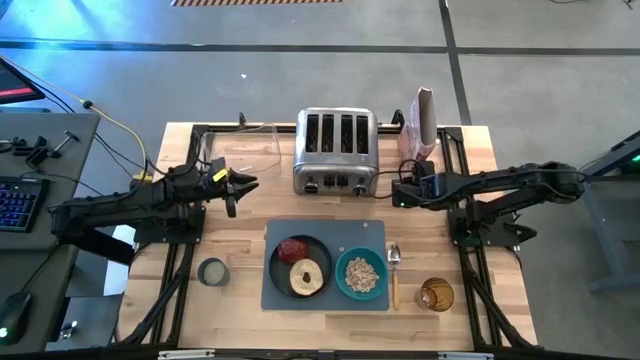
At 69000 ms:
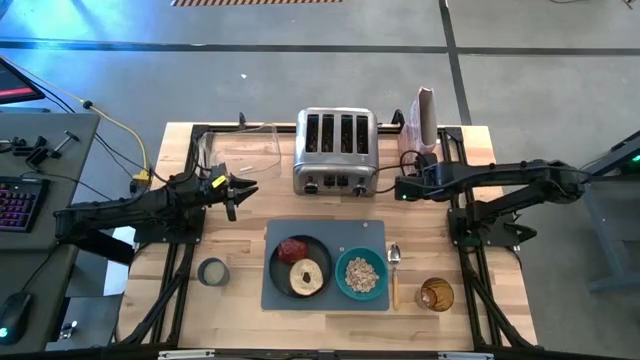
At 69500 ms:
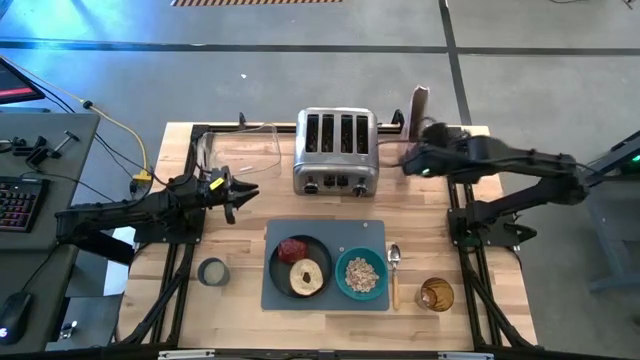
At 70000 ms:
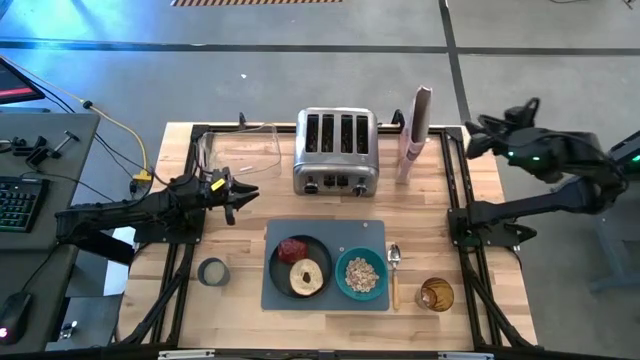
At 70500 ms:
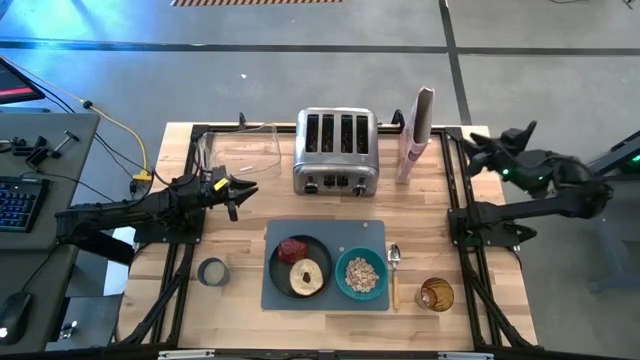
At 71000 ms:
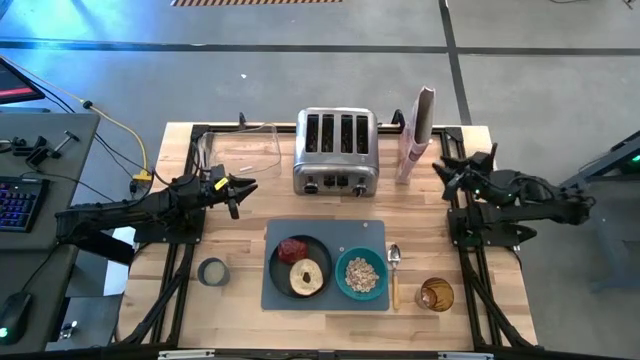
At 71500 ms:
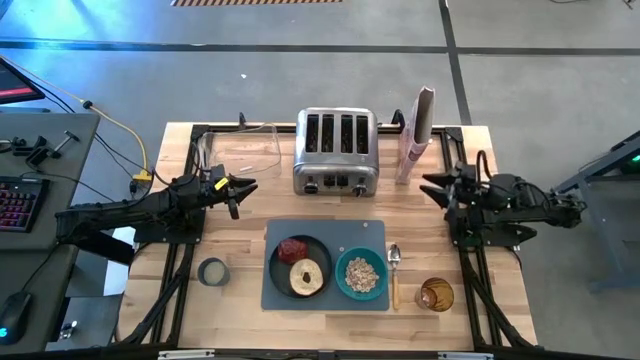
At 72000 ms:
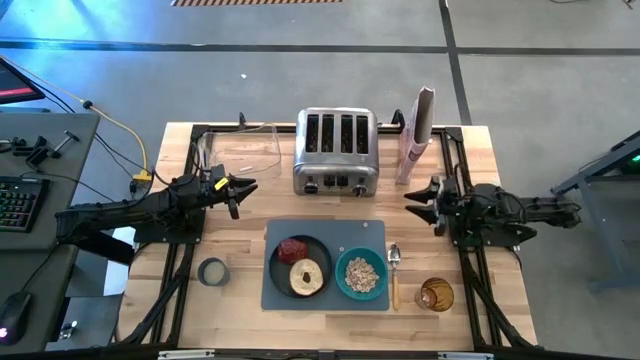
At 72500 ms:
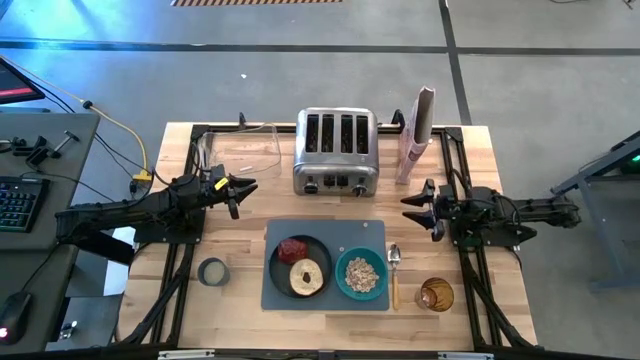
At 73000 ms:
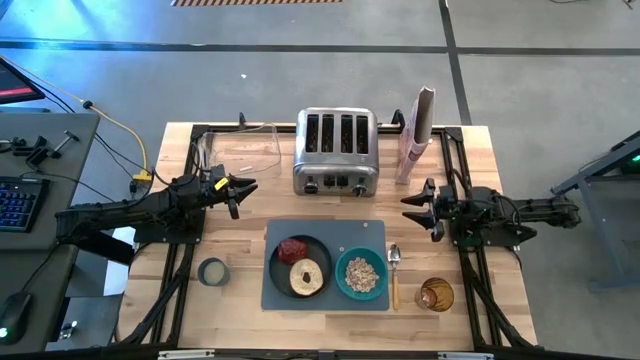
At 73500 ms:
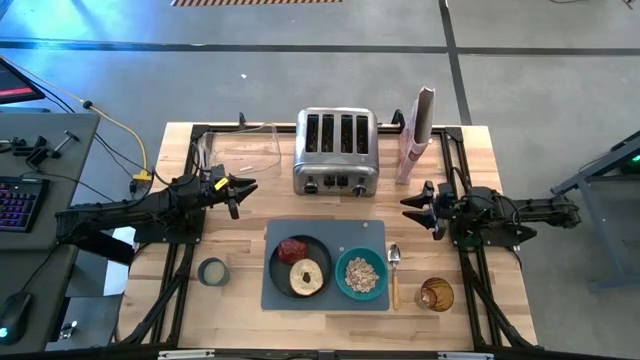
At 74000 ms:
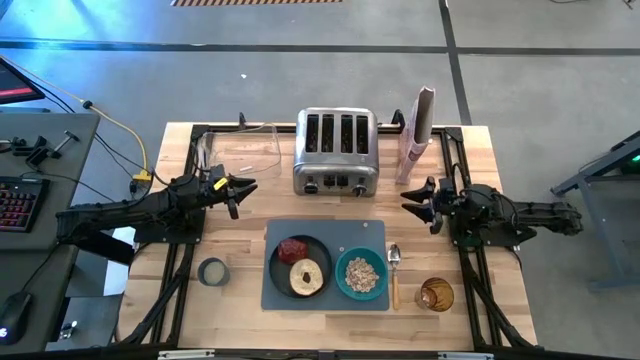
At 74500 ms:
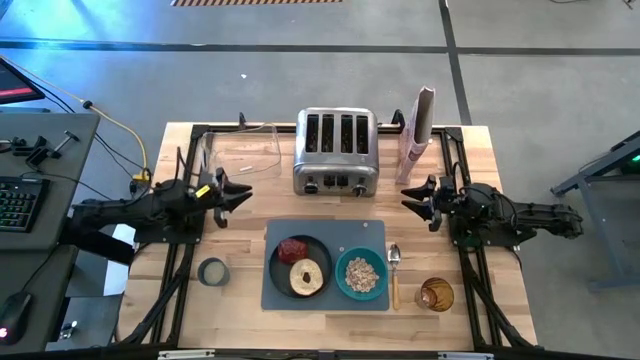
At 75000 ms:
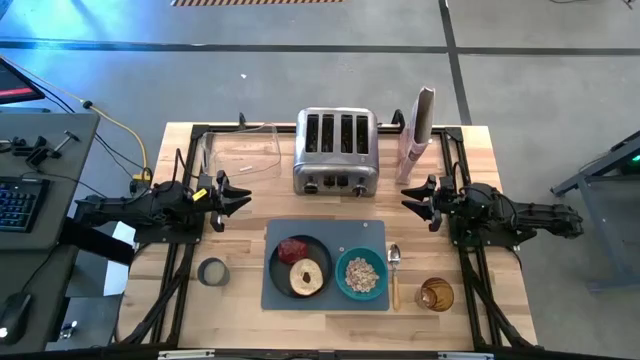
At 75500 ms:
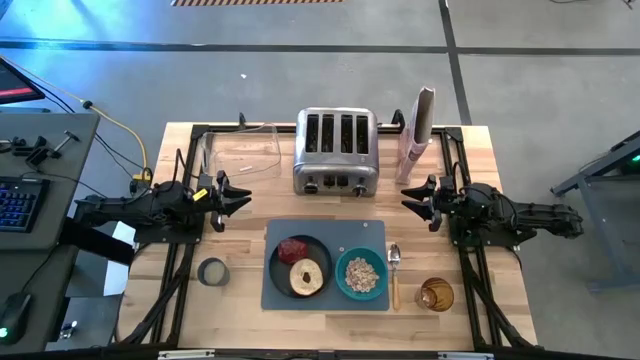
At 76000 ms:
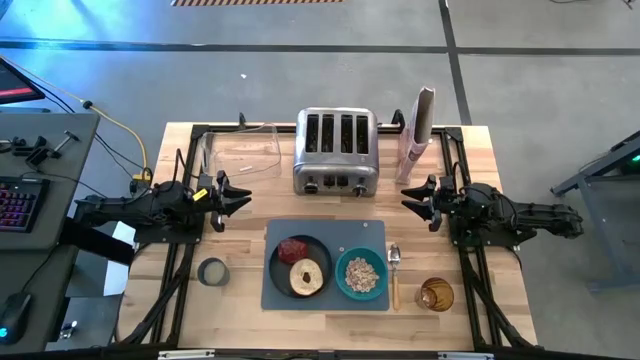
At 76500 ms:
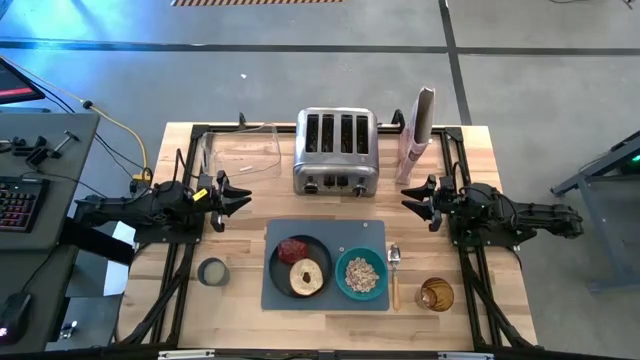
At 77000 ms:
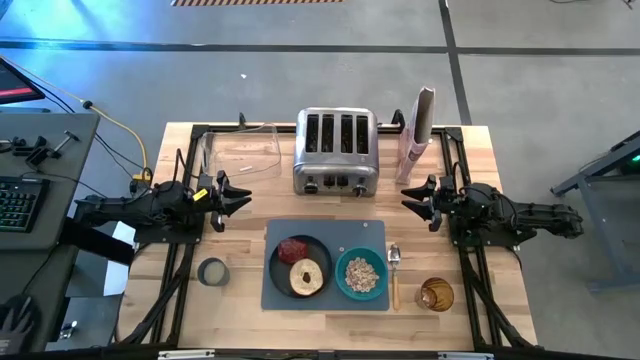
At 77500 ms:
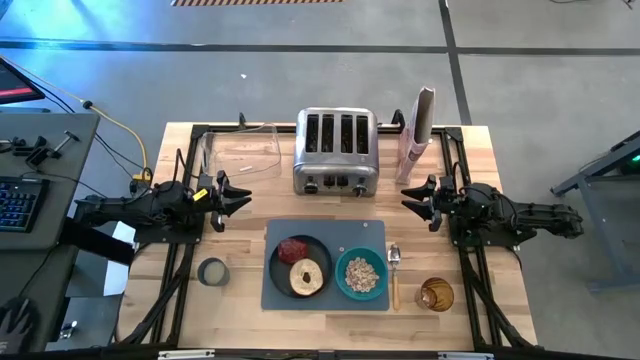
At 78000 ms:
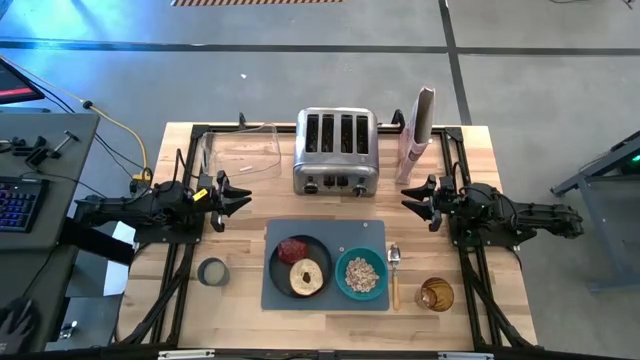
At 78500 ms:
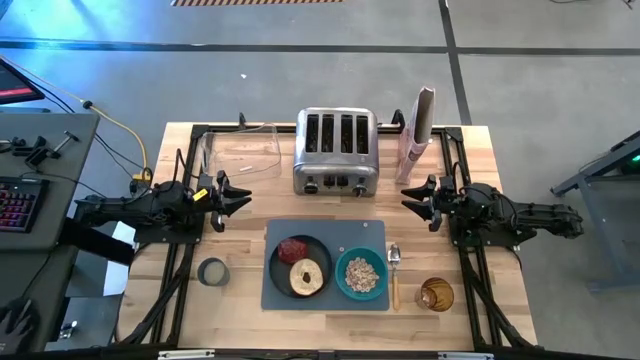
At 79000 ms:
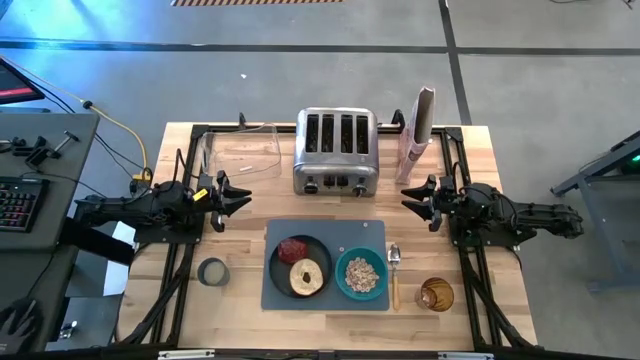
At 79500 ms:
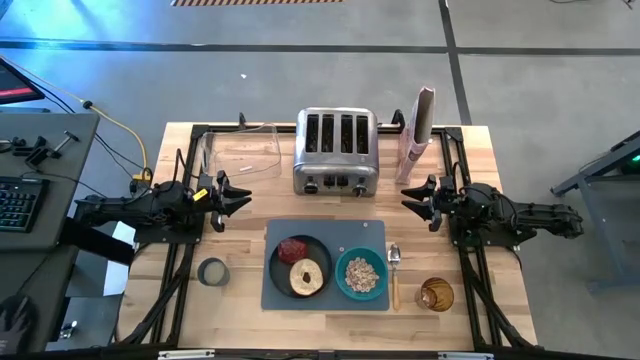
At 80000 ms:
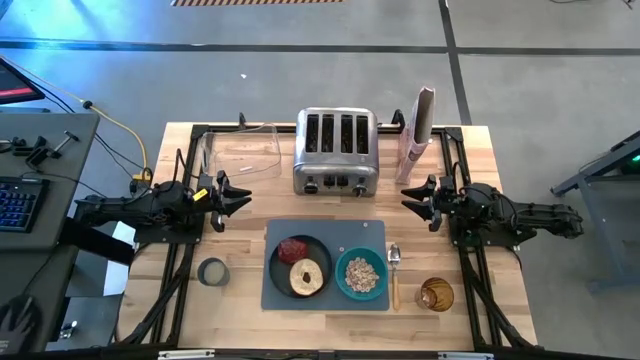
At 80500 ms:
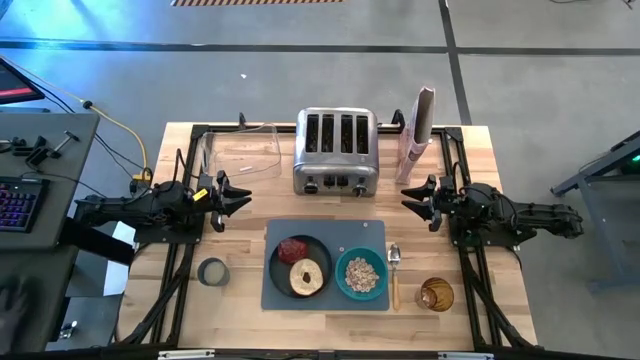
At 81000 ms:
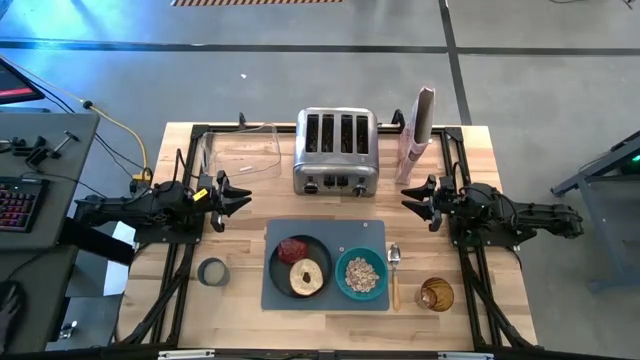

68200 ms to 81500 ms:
Task: Arrange a breakfast setting
Return to Home Position

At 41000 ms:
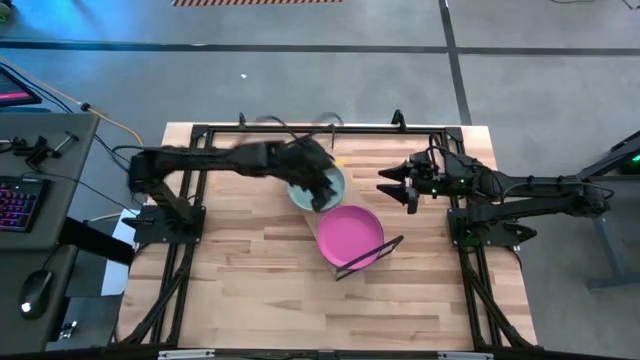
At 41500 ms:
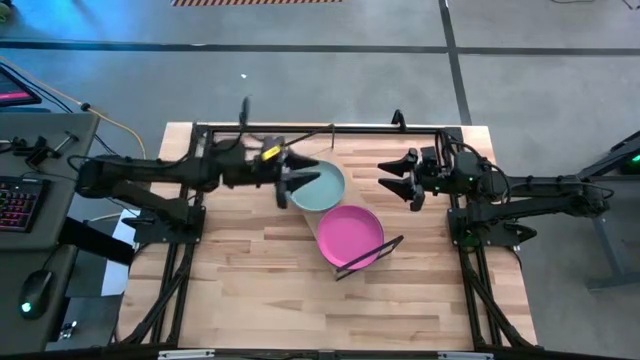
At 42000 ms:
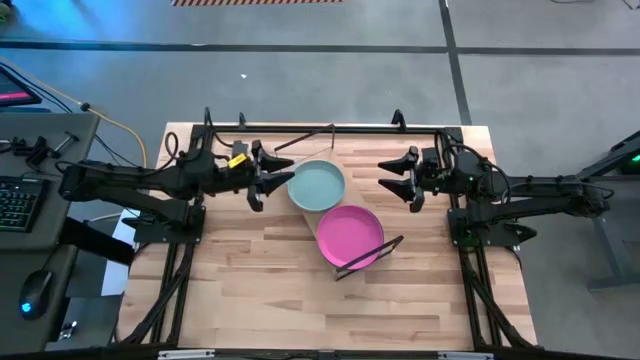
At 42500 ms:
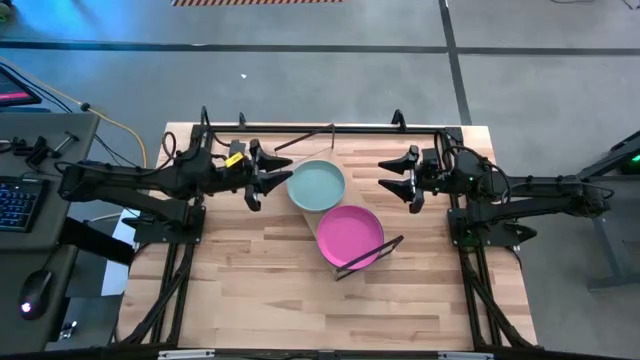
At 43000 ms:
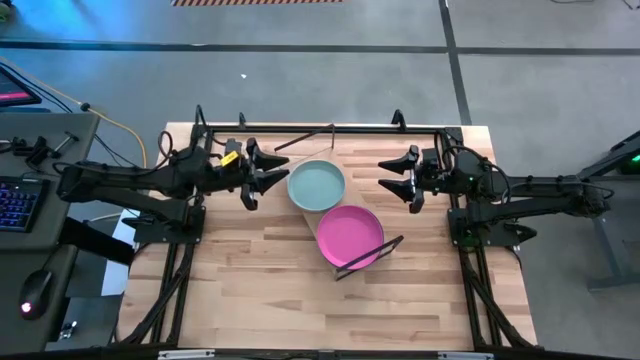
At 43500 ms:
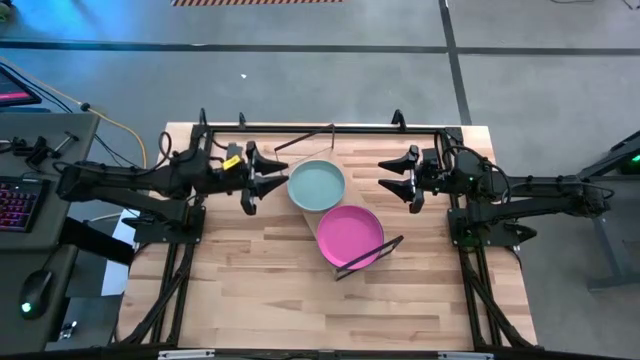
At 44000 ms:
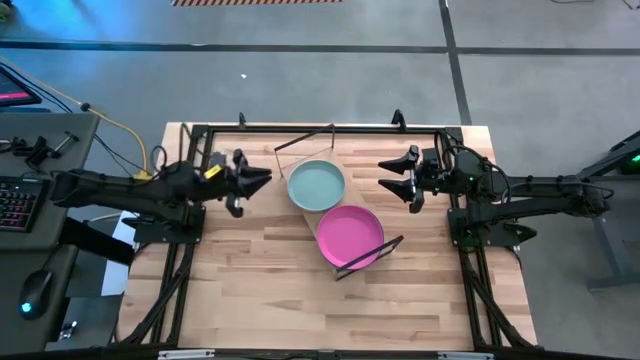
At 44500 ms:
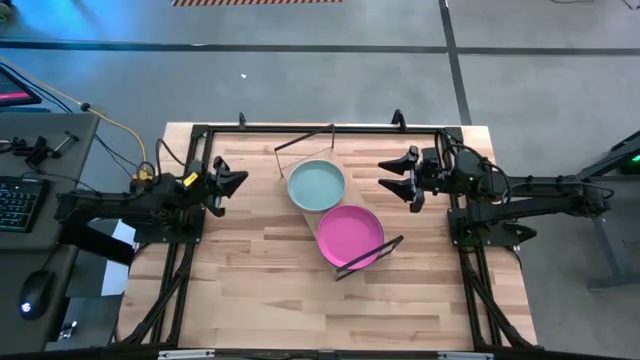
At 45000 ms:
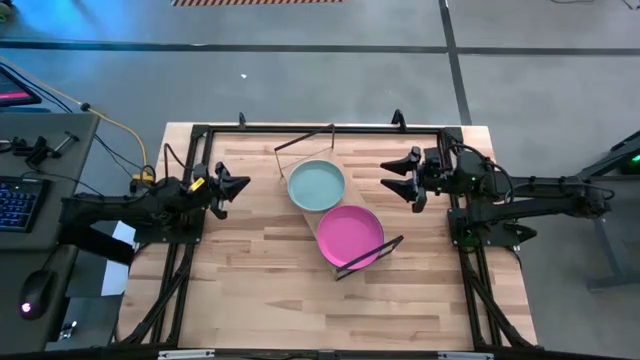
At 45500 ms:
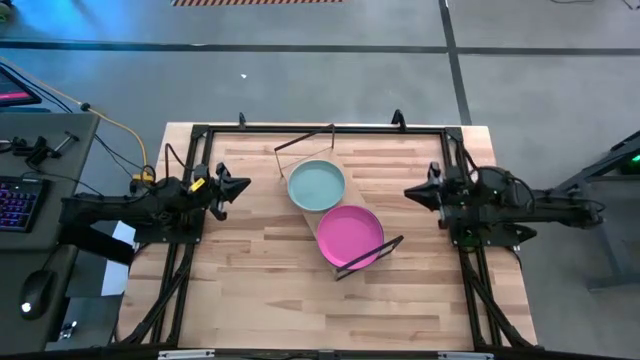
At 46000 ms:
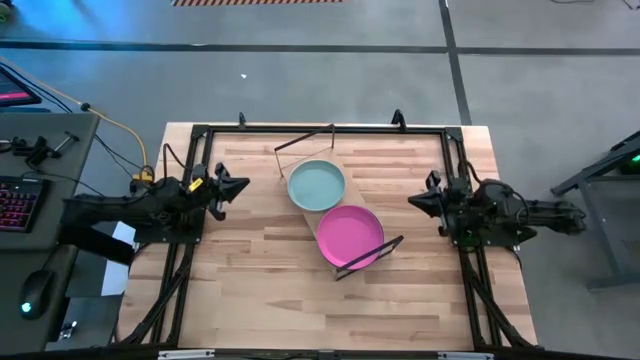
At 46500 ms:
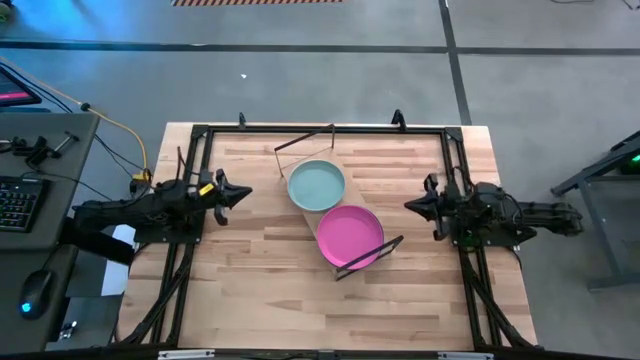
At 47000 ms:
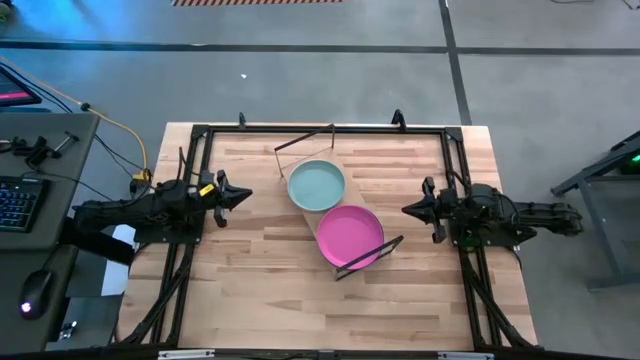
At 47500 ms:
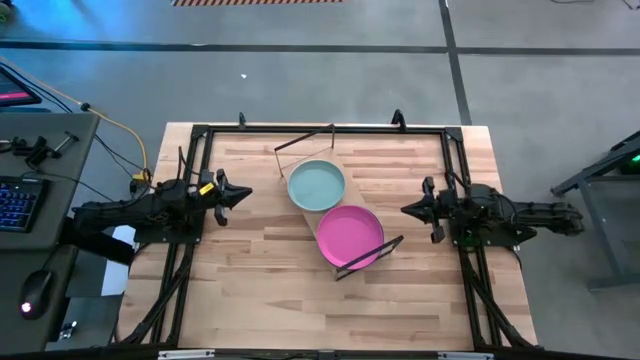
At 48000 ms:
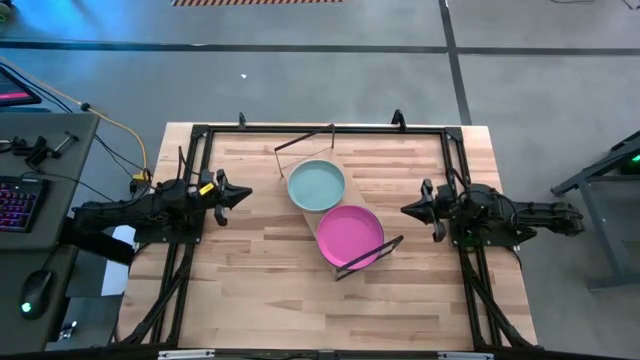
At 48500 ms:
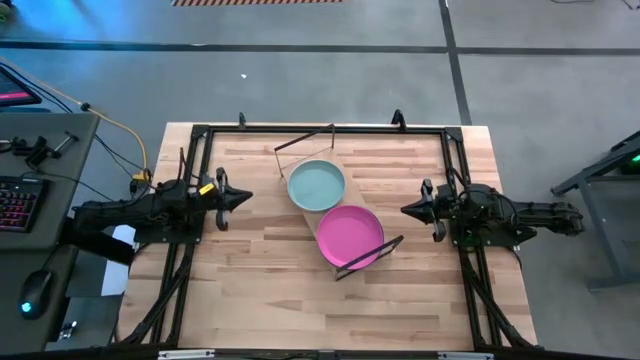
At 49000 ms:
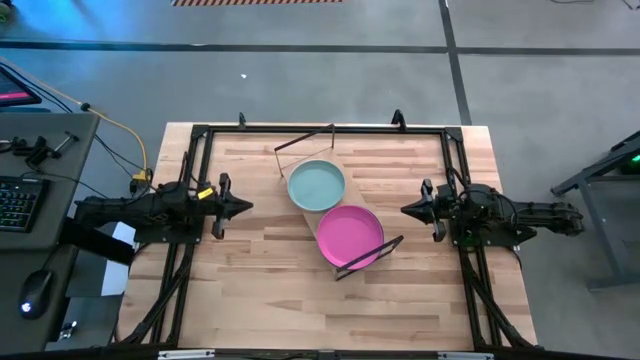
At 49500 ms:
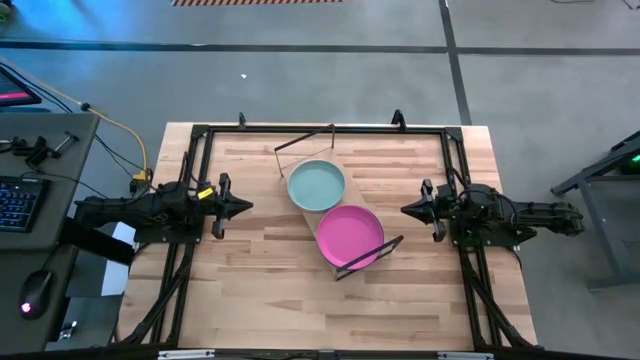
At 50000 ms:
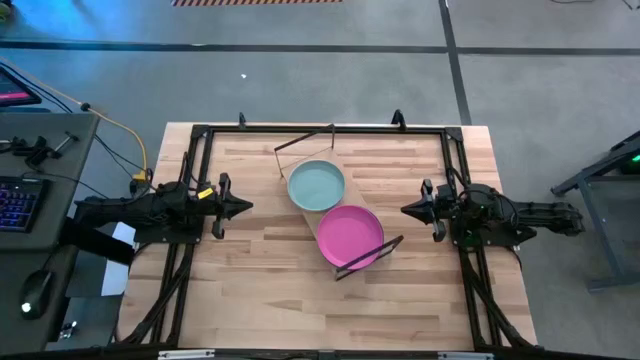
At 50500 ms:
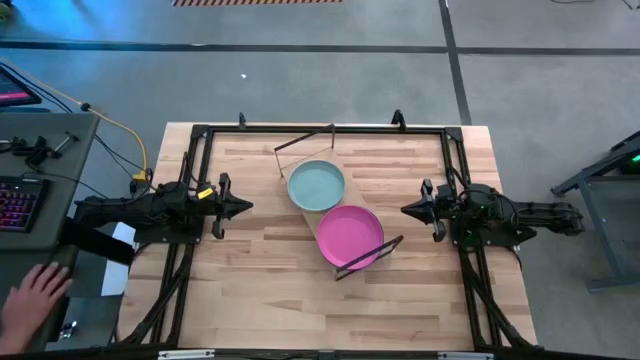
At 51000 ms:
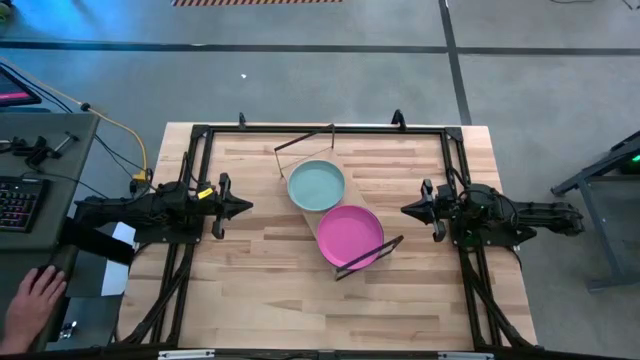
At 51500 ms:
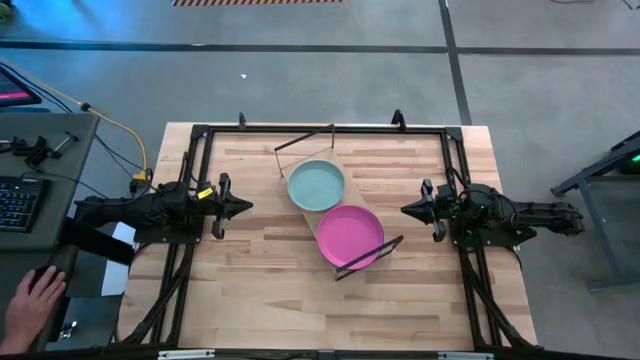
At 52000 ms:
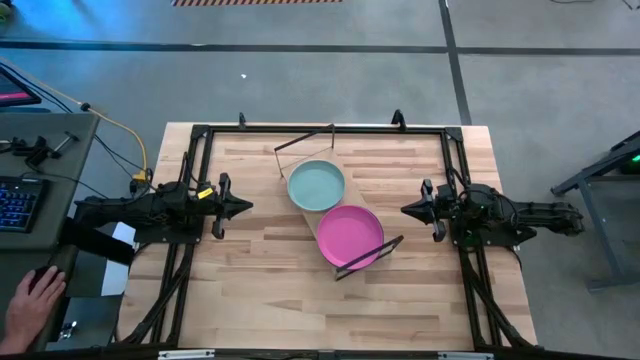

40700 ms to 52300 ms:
Task: Place and stack plates onto a shelf
Return to home position
